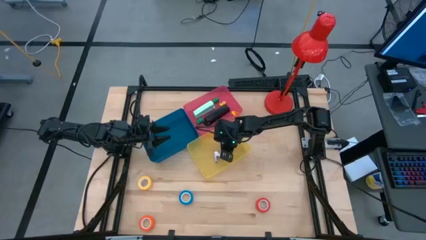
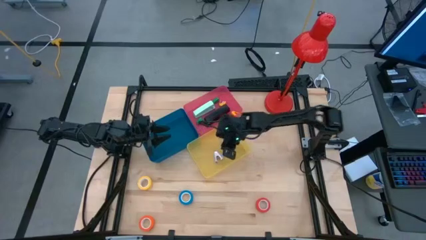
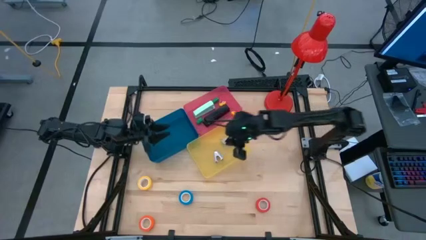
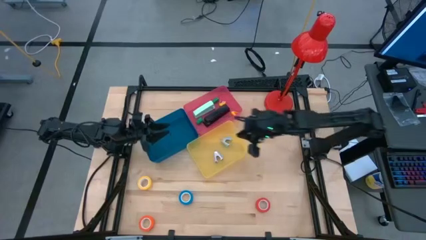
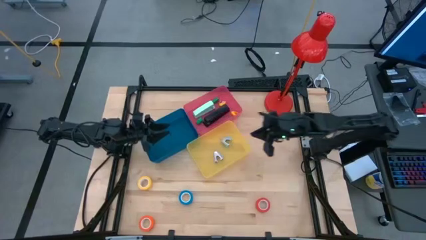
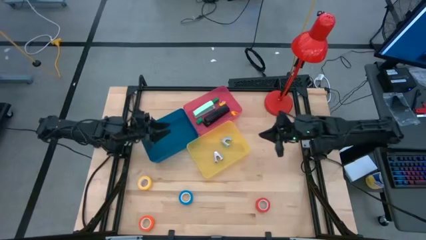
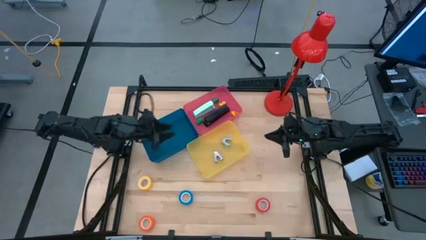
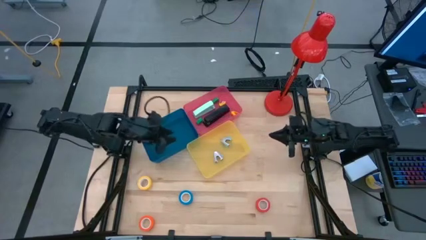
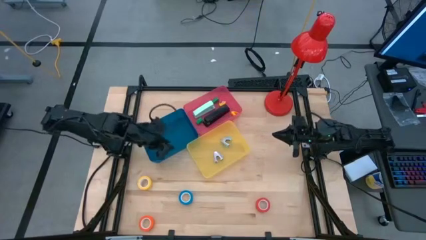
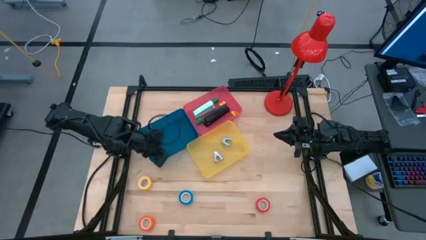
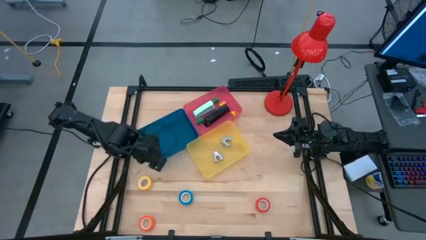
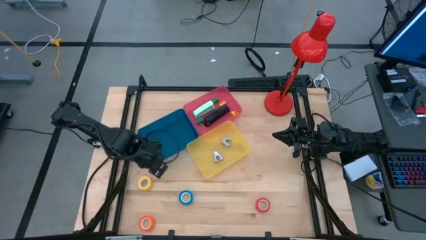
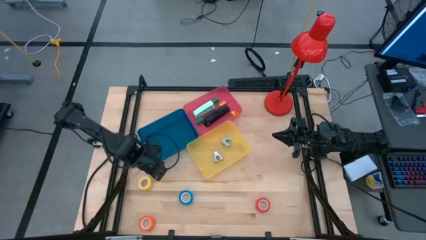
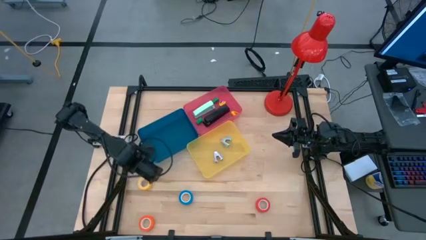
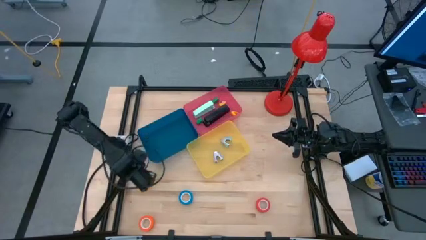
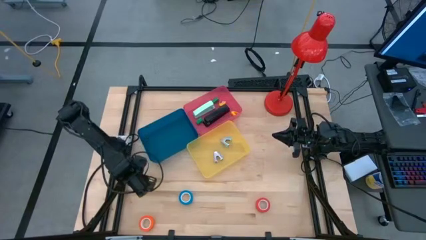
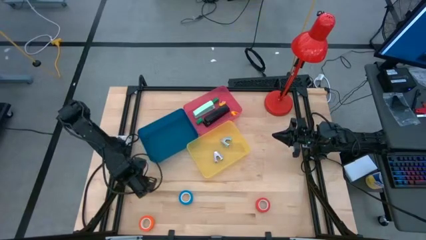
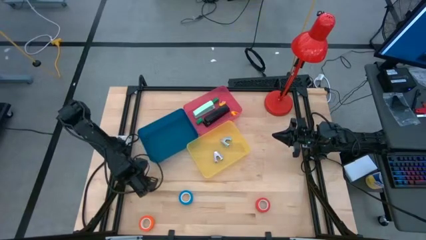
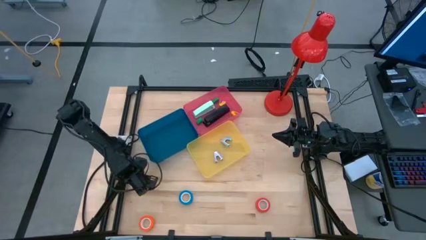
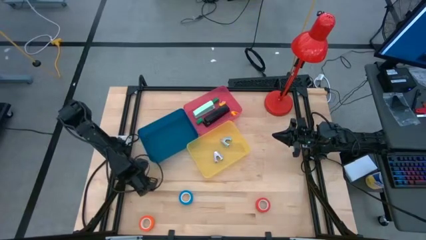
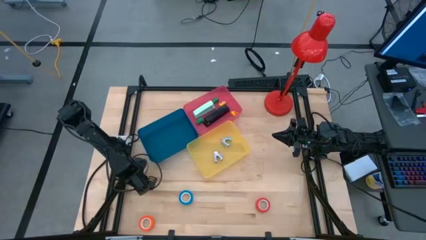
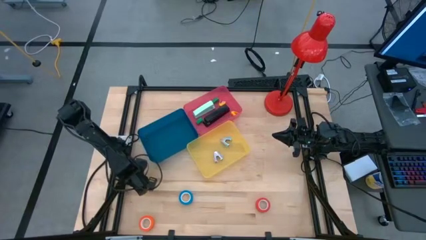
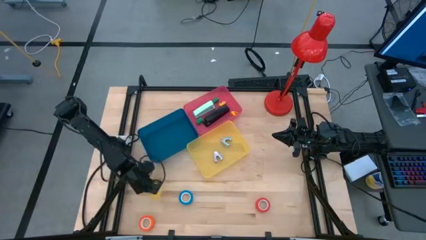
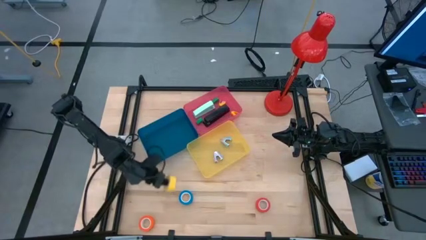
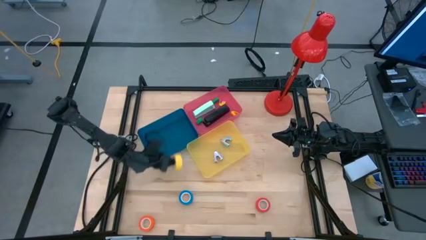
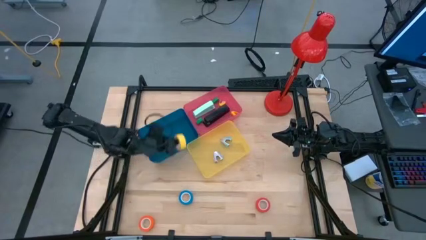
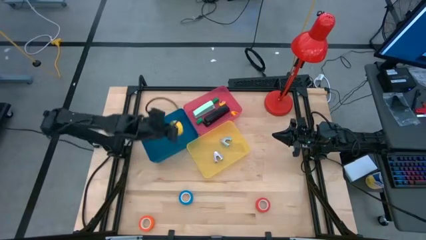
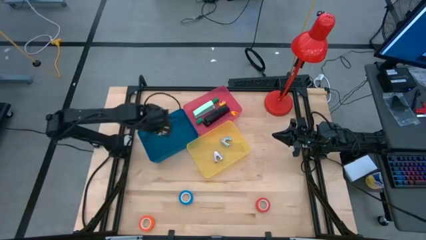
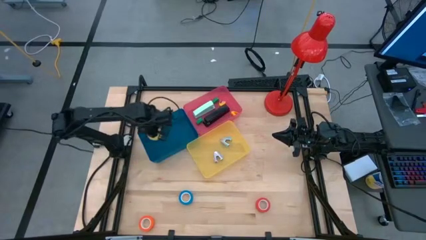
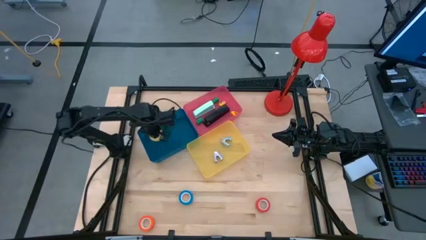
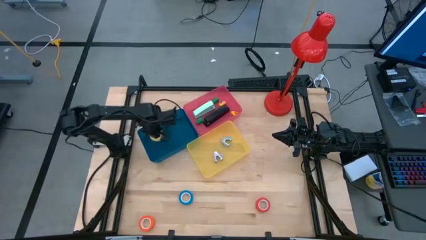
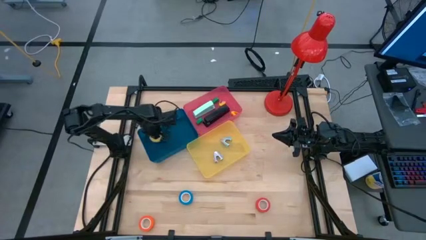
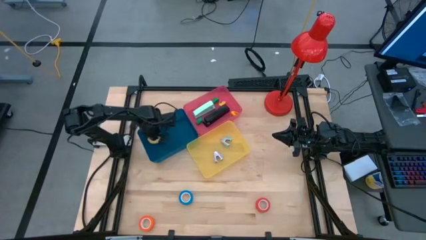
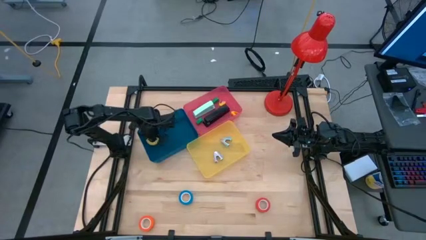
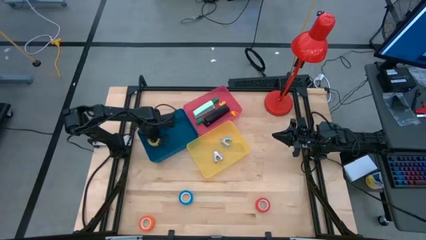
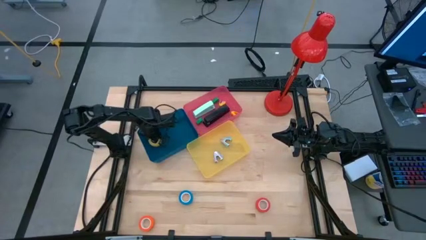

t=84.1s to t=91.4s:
Task: Pick and place Stapler, Stapler remover, tape
Put the yellow tape into the blue bin

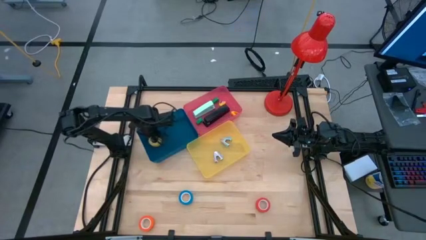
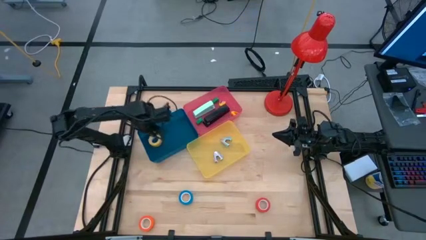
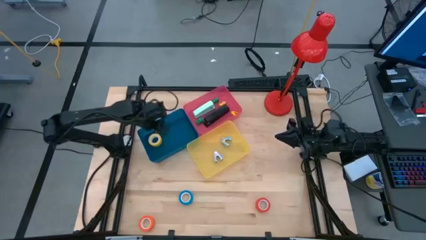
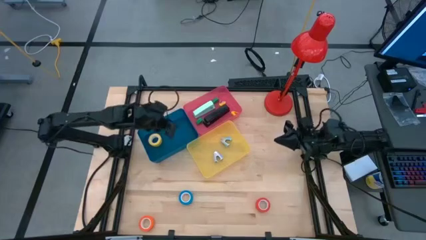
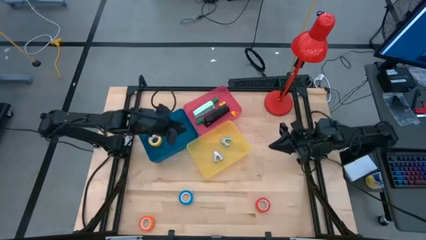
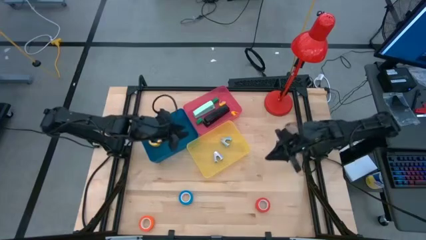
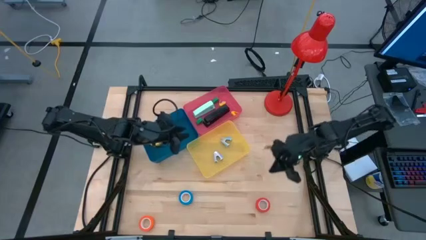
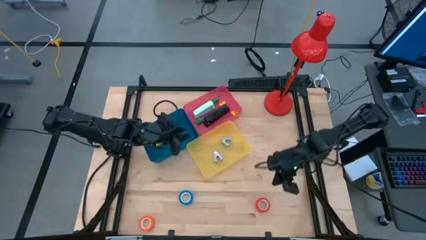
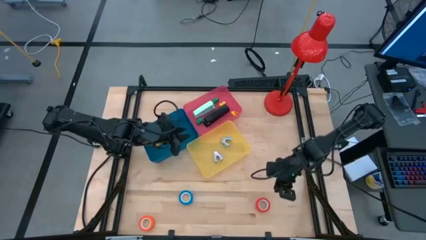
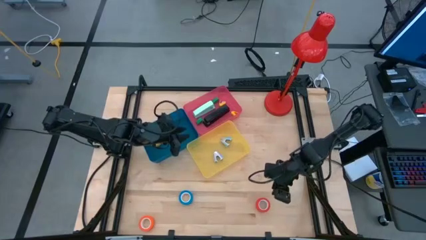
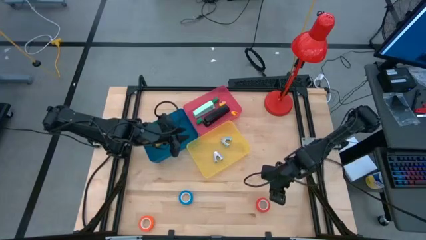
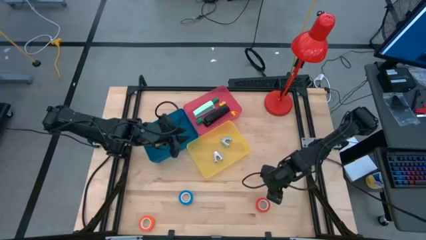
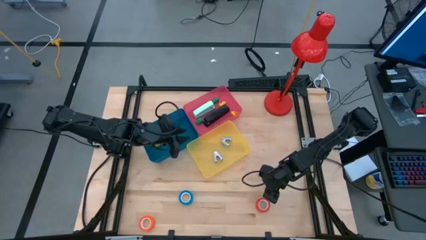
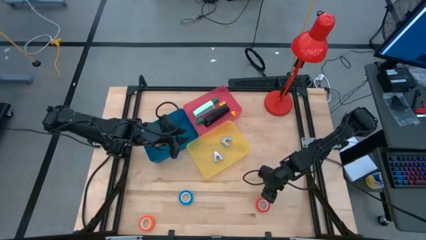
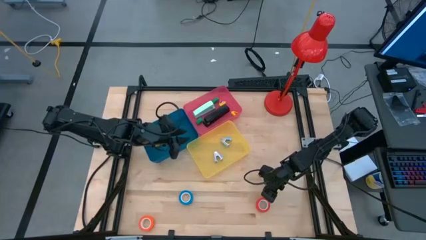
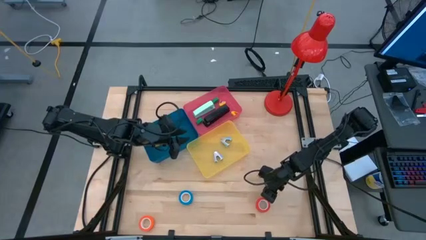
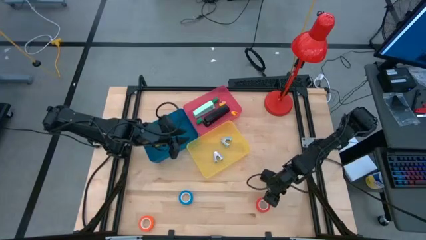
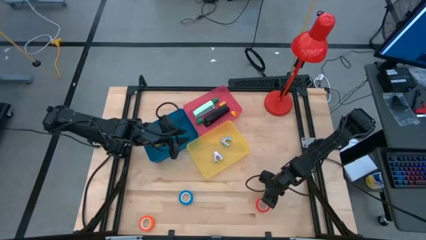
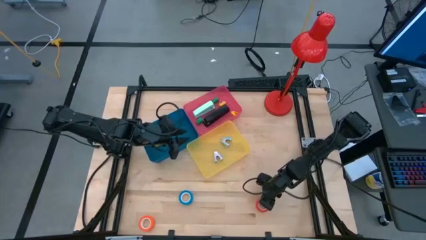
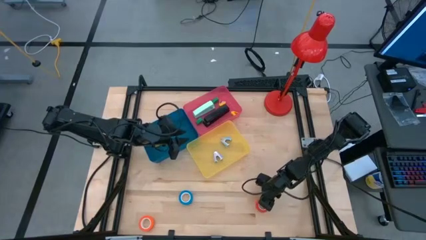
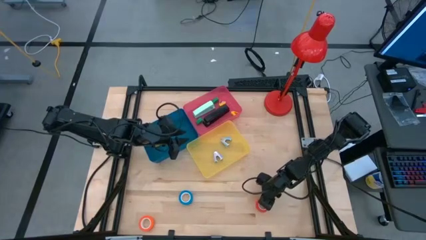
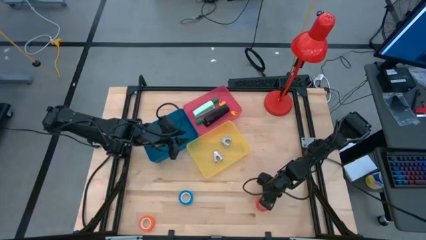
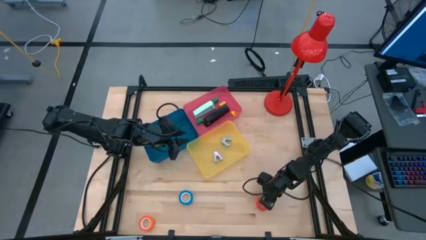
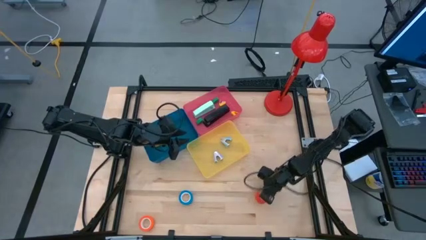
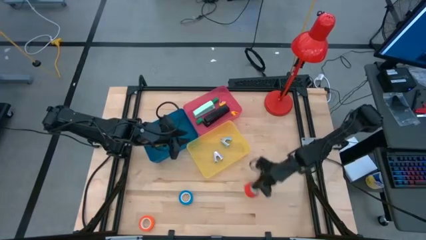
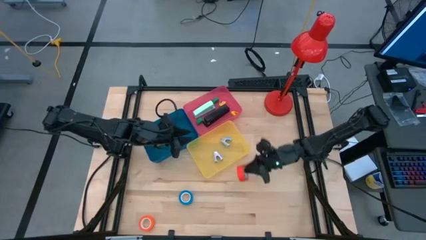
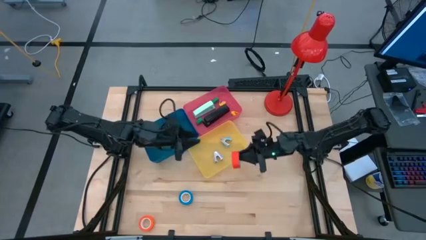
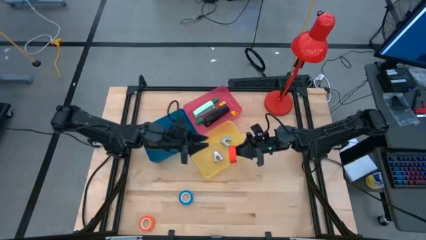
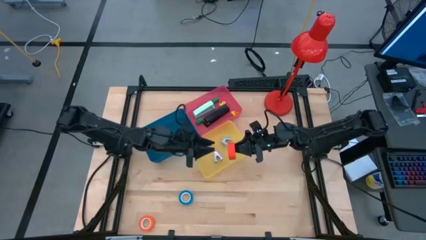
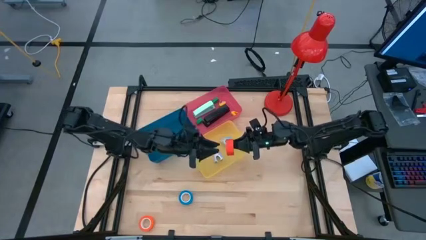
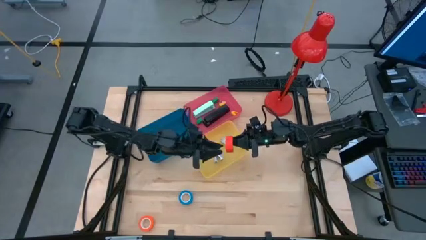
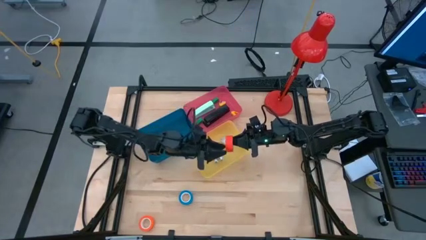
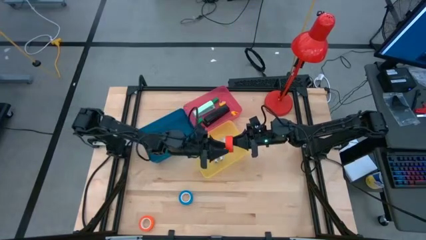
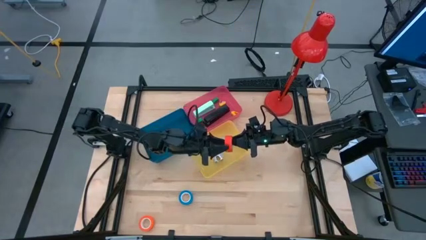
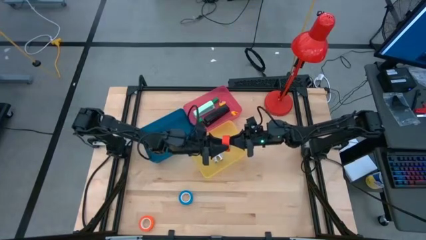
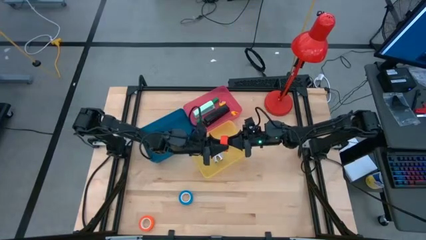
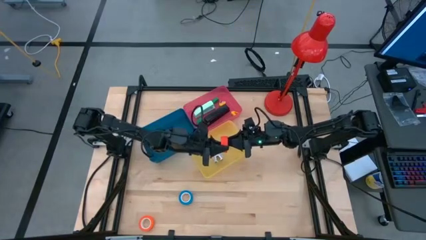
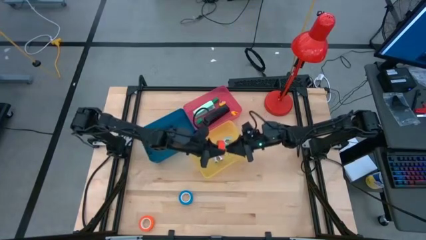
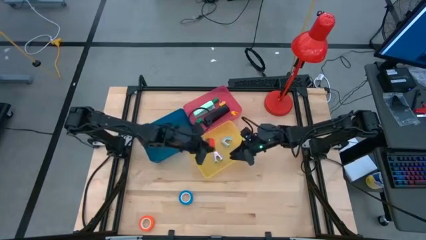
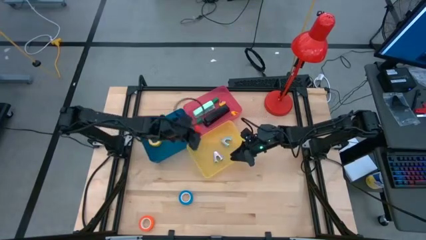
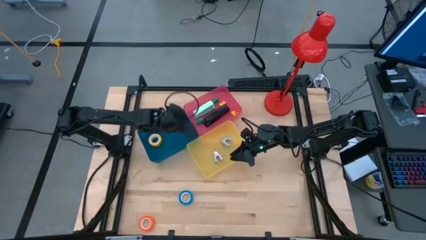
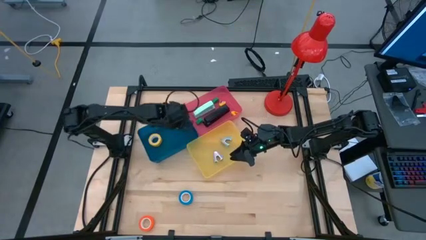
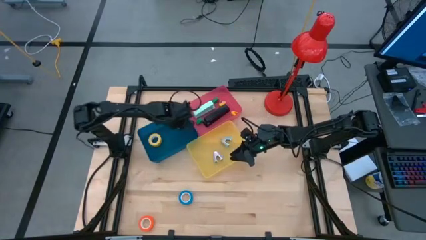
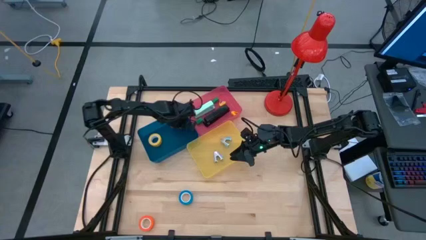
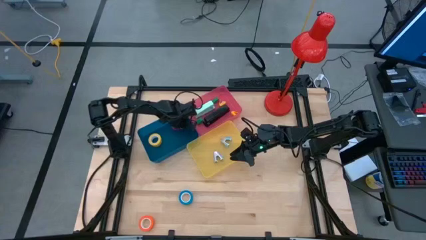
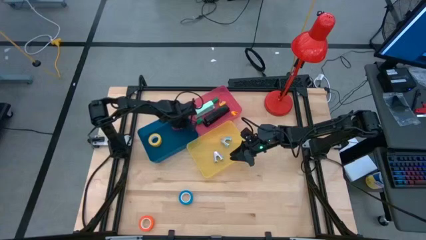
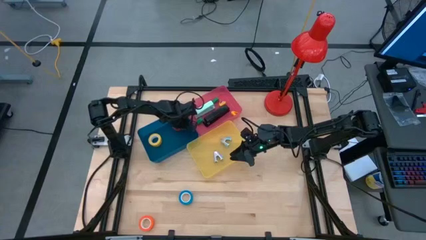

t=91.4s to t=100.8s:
Put the red tape into the blue bin
